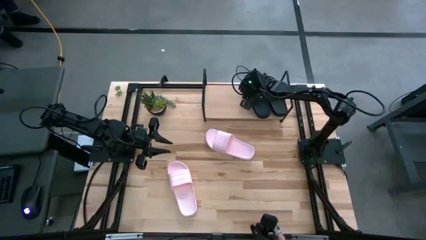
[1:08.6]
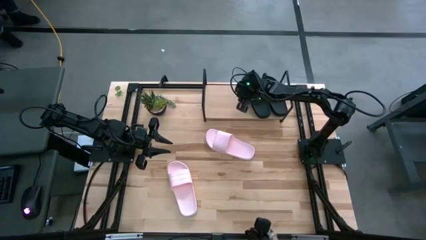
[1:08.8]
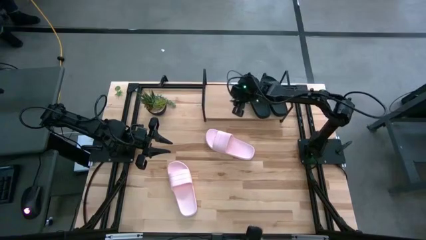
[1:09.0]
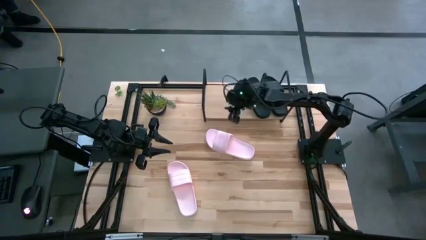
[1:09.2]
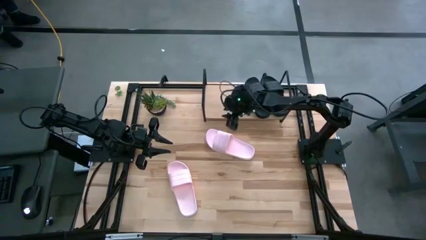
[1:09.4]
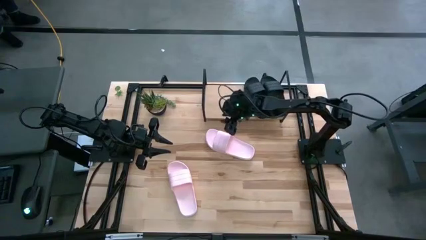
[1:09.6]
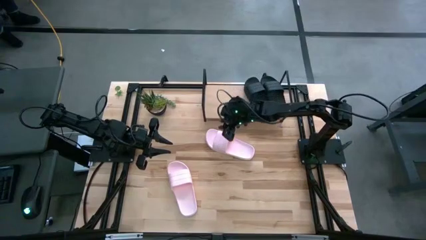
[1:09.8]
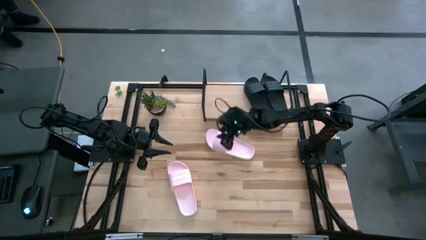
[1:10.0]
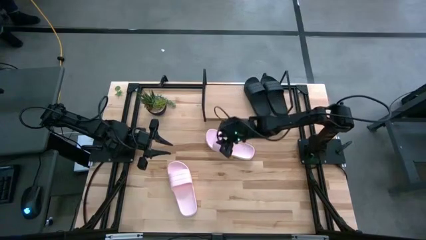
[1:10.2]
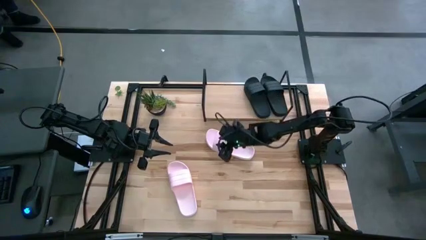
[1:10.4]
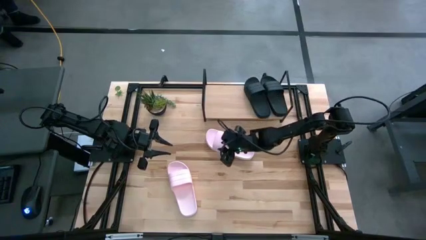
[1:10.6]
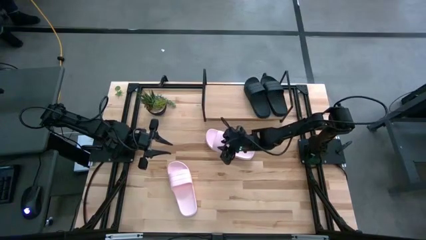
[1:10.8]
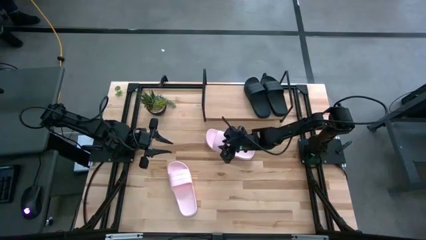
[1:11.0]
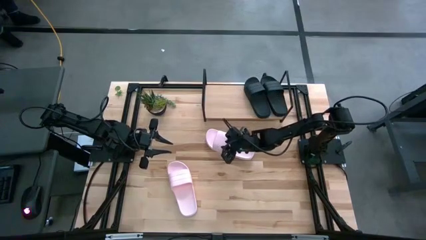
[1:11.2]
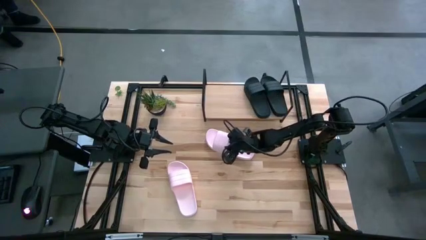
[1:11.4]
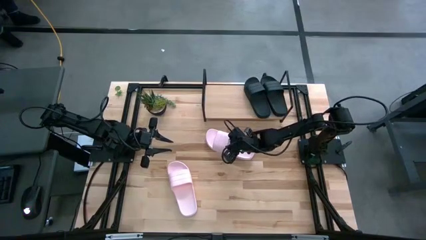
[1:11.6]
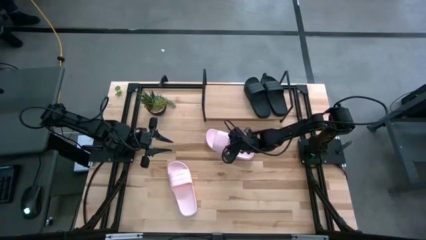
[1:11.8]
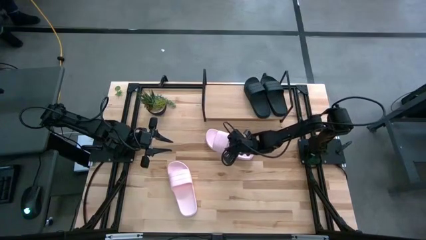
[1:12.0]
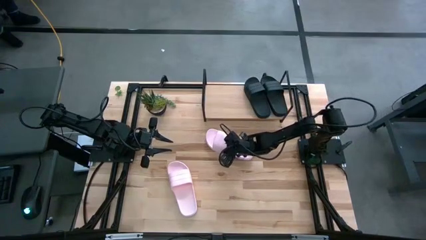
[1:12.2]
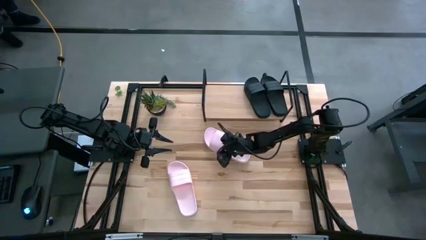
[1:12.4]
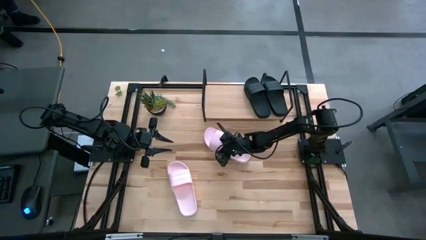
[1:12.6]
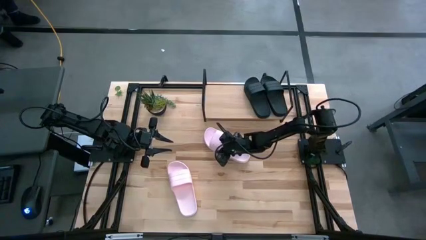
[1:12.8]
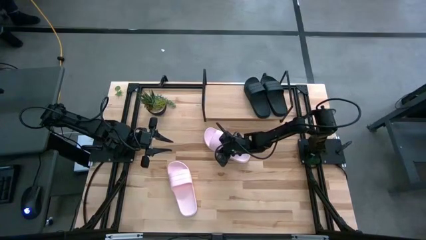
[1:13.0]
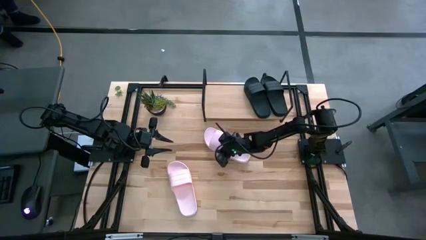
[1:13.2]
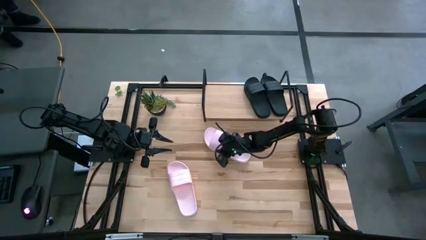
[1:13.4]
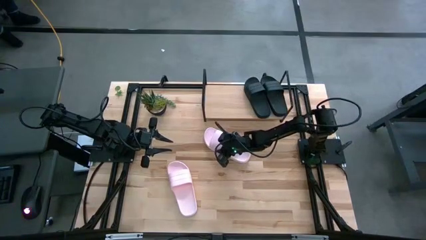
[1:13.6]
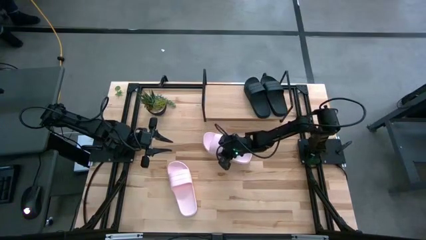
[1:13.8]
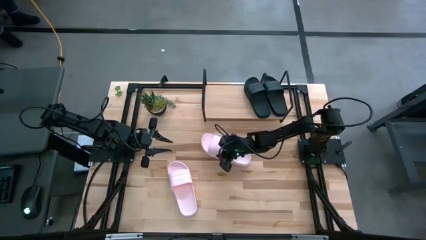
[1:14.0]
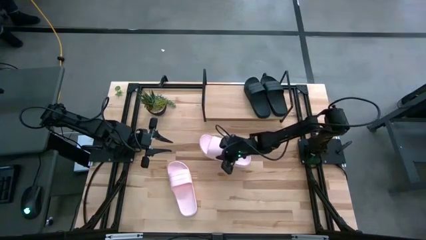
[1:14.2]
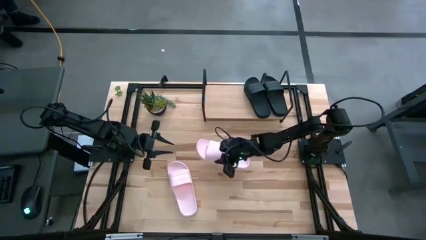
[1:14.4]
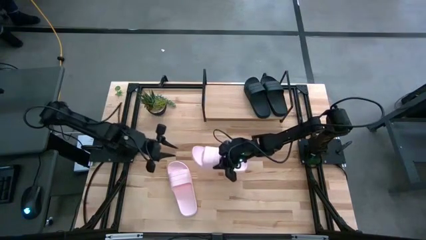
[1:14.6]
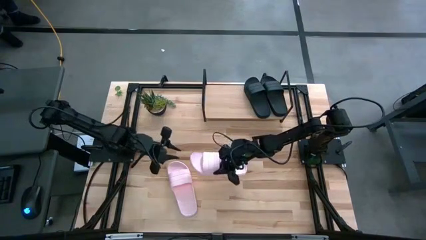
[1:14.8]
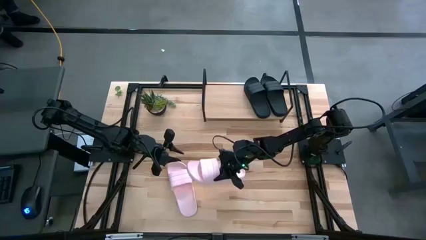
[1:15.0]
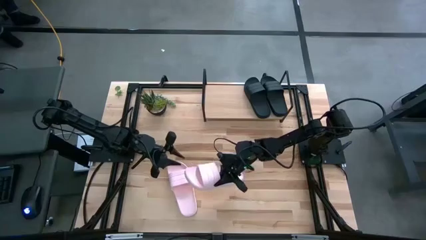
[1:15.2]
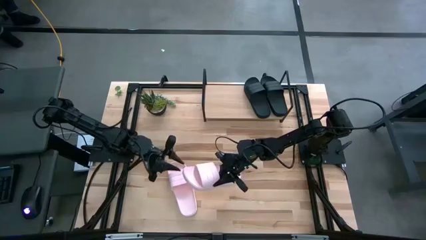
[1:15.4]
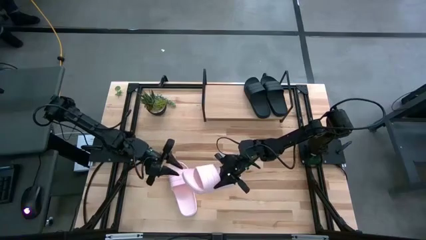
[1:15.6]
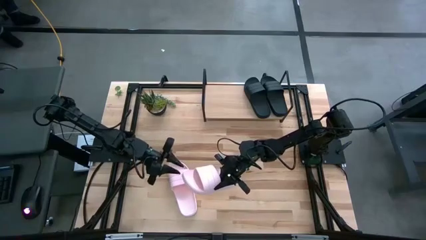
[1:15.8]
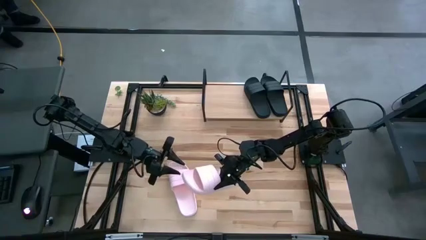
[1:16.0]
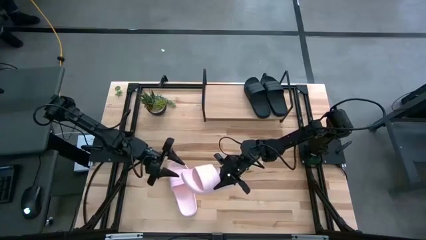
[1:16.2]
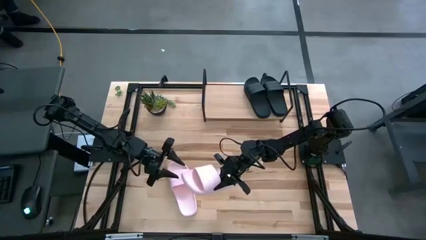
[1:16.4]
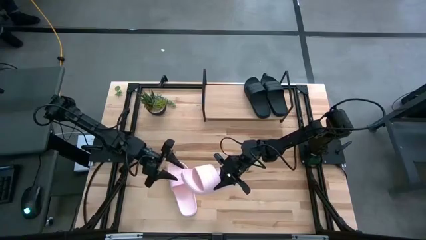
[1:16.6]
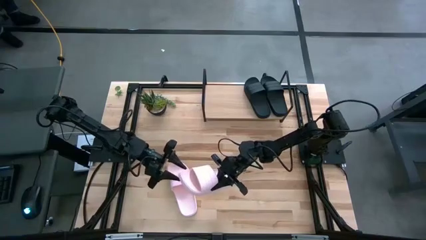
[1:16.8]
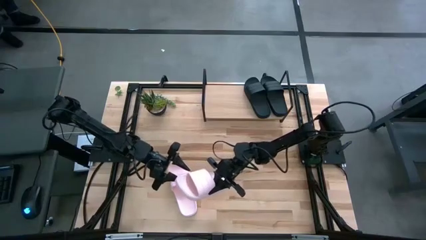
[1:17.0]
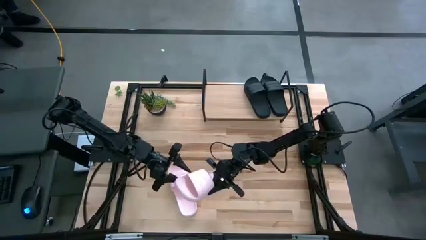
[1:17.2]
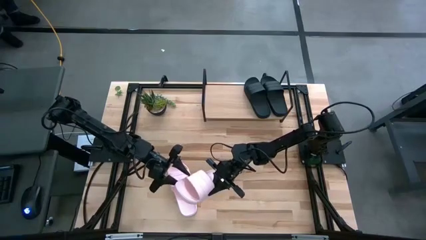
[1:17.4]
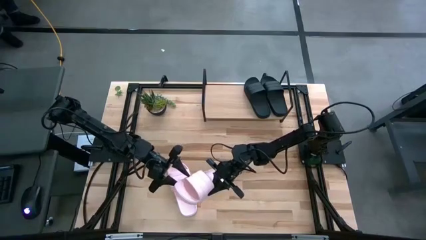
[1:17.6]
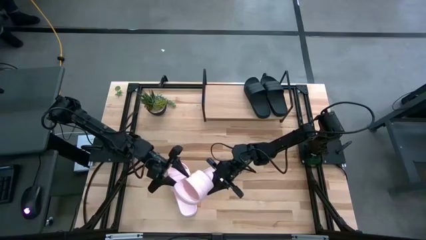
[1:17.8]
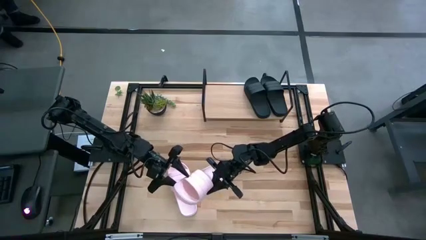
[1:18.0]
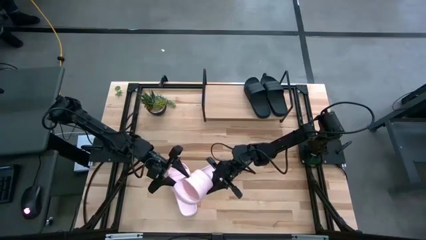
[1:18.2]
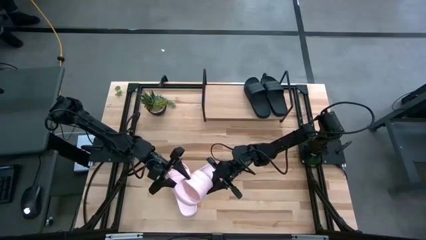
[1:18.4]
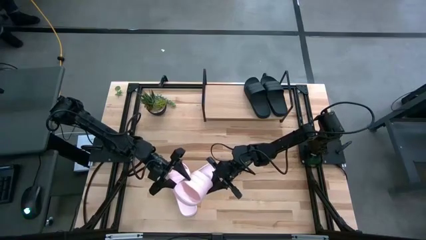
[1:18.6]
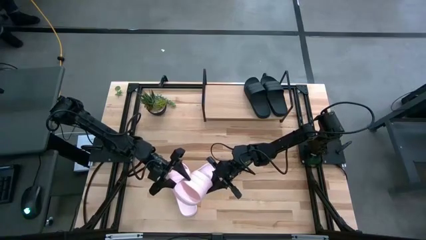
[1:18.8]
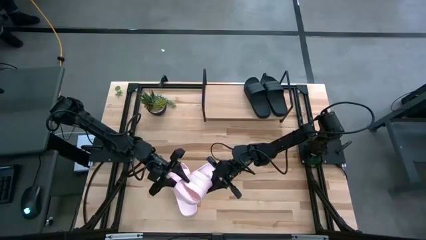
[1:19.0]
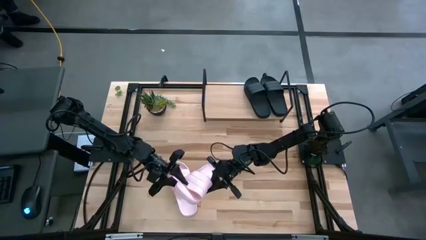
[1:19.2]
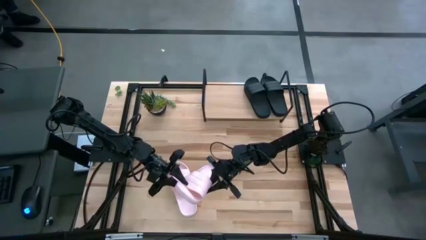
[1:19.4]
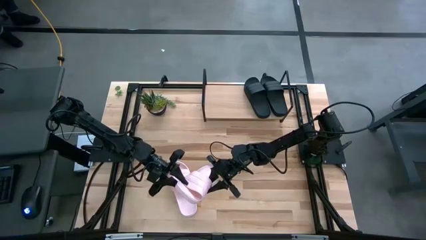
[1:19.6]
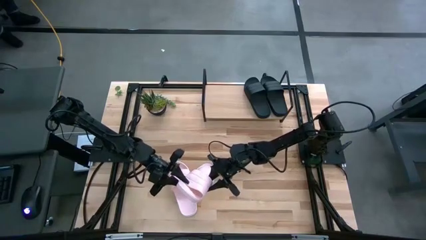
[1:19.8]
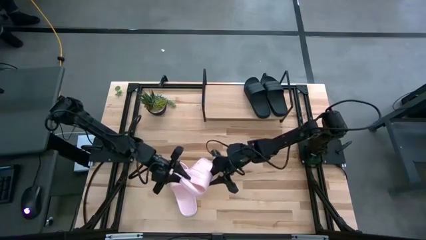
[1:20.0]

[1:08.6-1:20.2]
Task: Pick and place slides into the shelf
Put the top pink slide on the shelf
